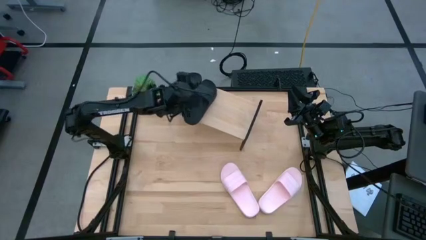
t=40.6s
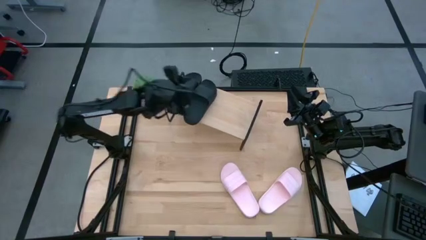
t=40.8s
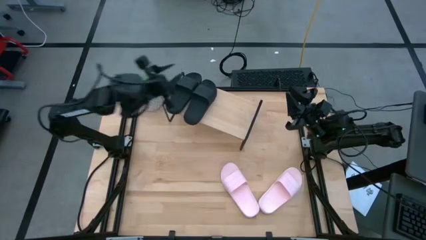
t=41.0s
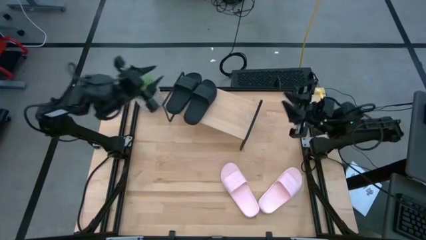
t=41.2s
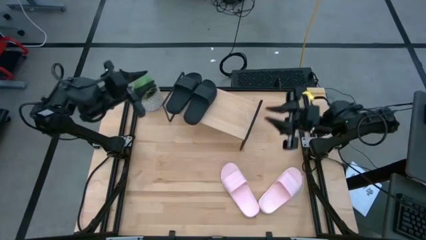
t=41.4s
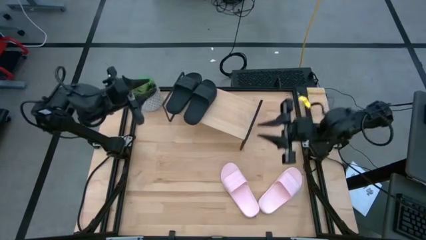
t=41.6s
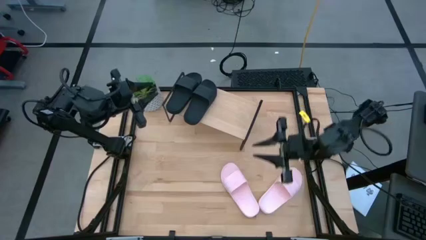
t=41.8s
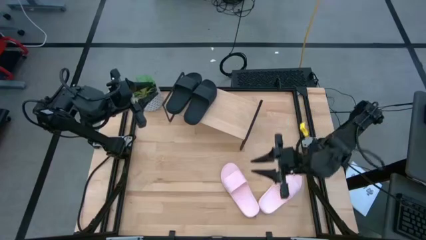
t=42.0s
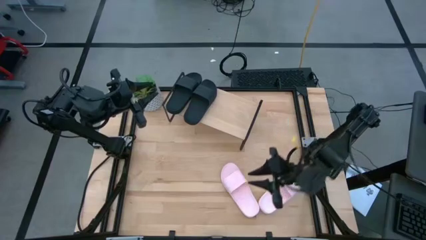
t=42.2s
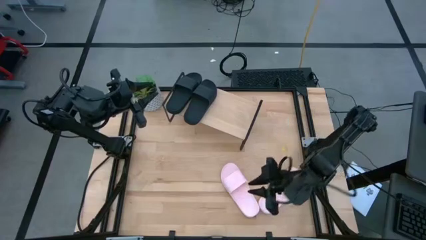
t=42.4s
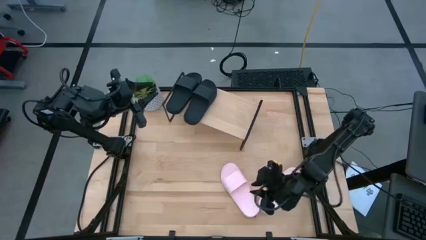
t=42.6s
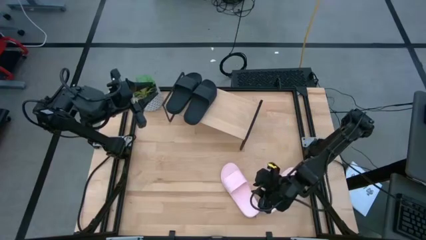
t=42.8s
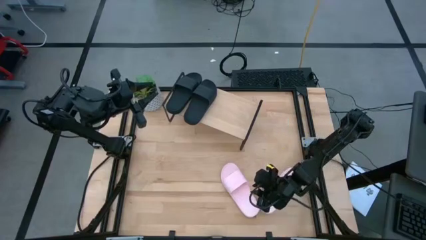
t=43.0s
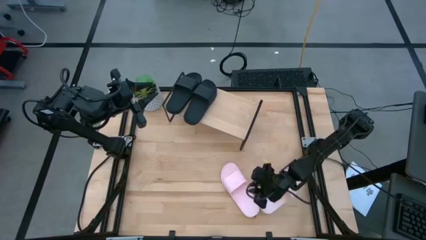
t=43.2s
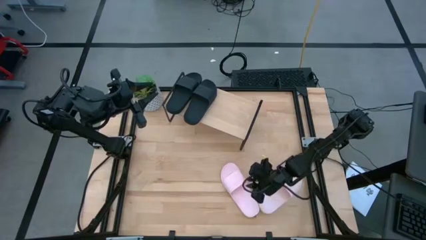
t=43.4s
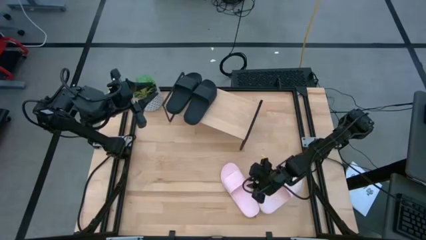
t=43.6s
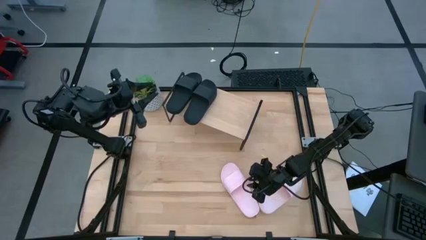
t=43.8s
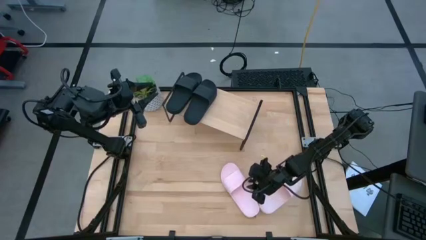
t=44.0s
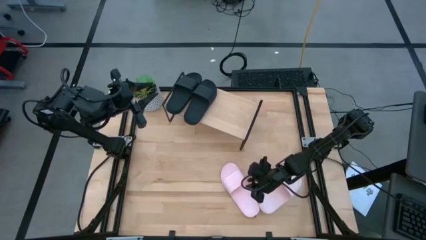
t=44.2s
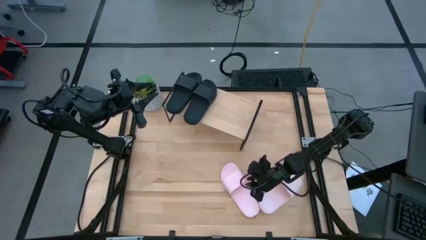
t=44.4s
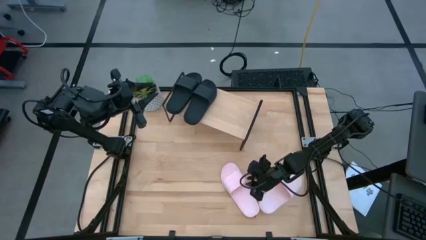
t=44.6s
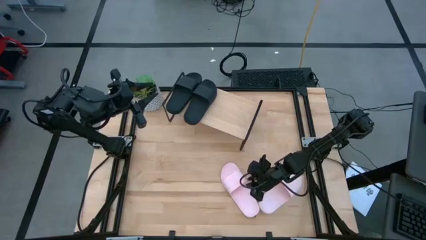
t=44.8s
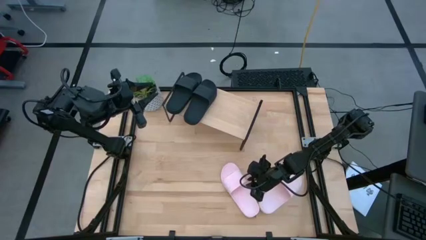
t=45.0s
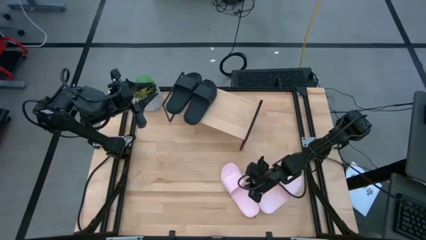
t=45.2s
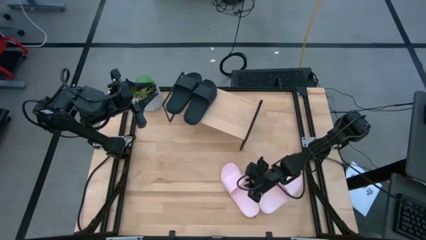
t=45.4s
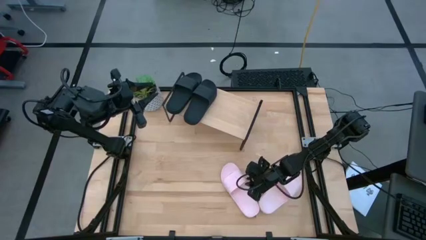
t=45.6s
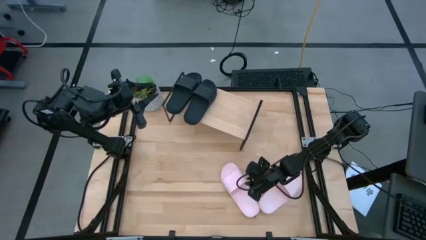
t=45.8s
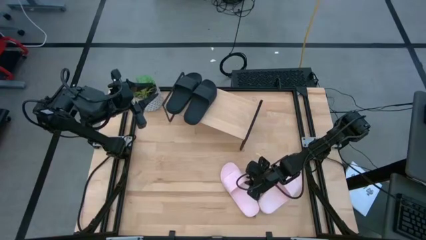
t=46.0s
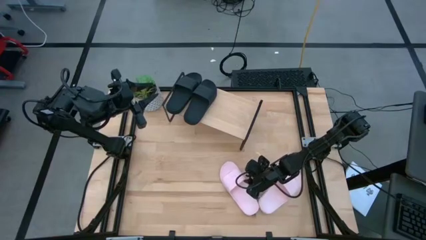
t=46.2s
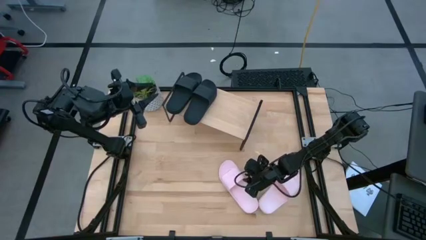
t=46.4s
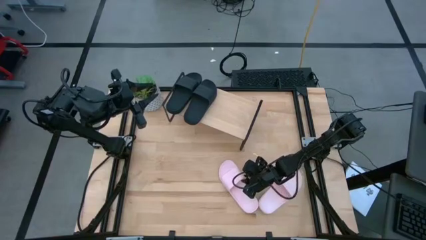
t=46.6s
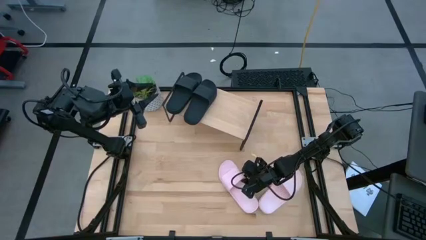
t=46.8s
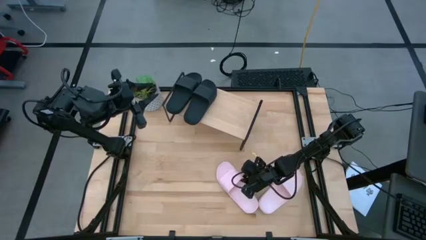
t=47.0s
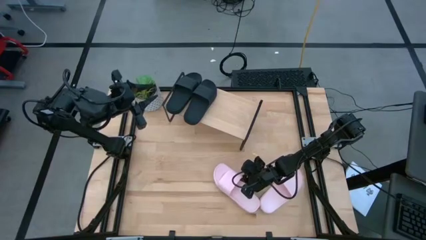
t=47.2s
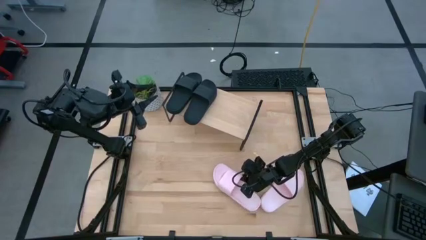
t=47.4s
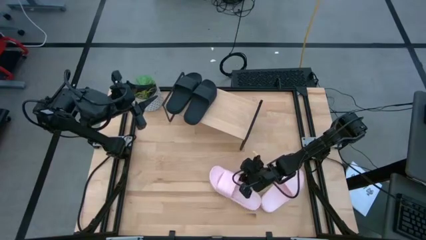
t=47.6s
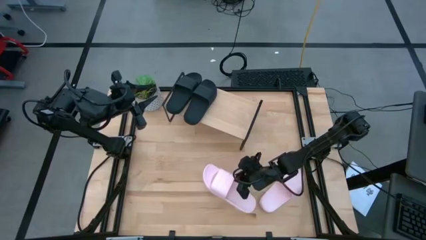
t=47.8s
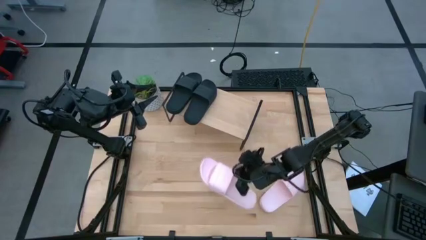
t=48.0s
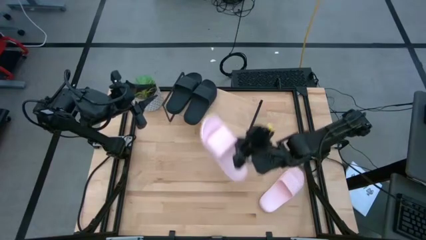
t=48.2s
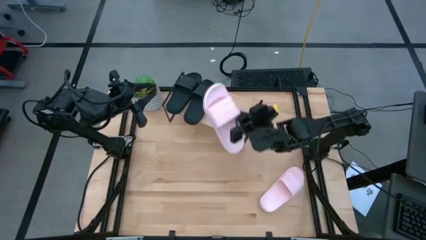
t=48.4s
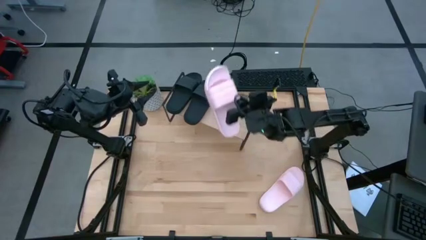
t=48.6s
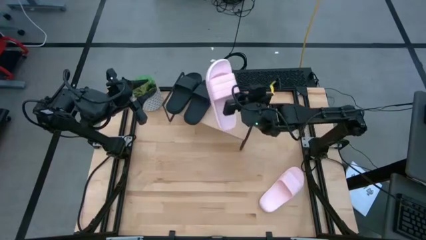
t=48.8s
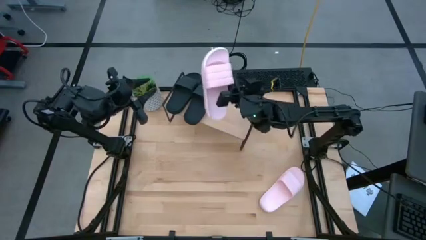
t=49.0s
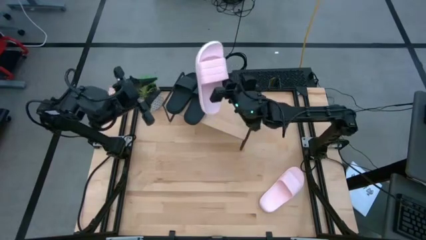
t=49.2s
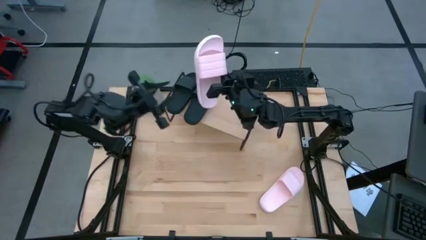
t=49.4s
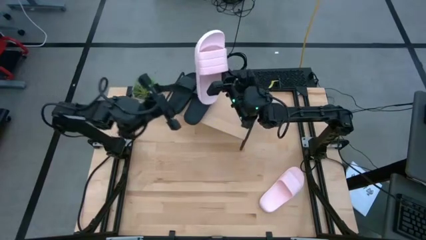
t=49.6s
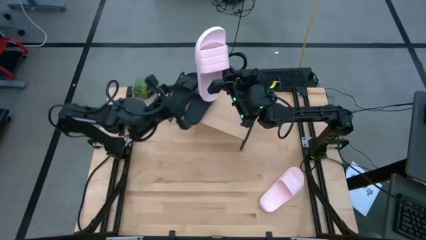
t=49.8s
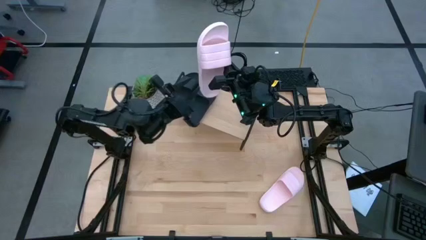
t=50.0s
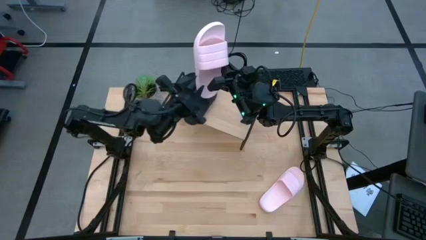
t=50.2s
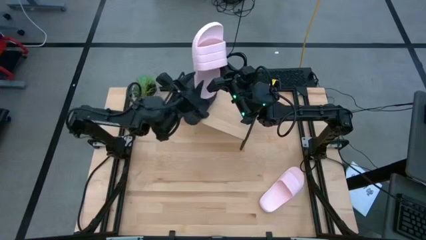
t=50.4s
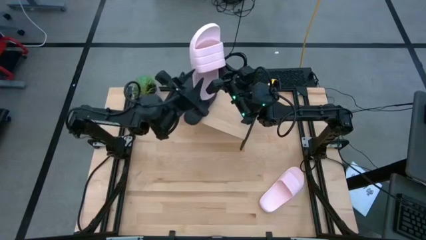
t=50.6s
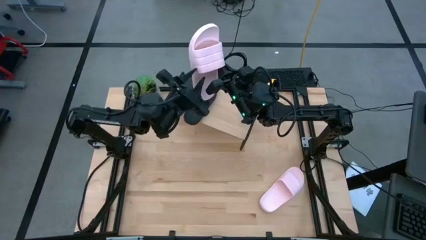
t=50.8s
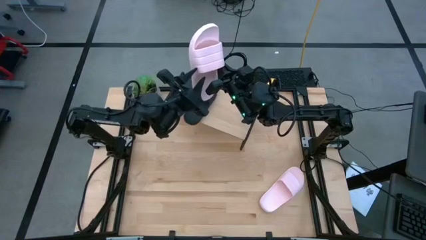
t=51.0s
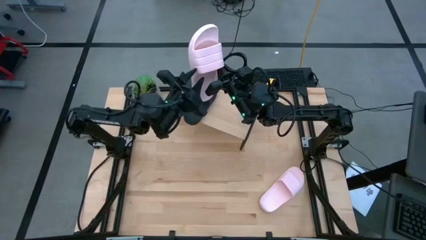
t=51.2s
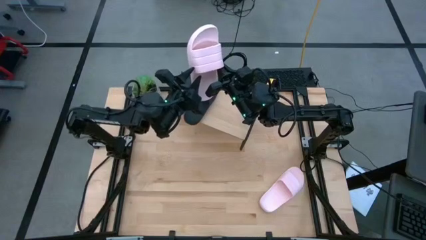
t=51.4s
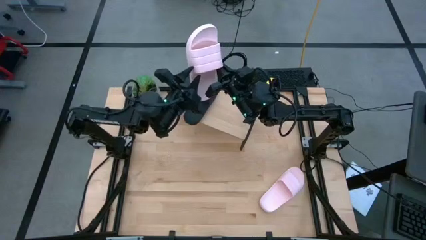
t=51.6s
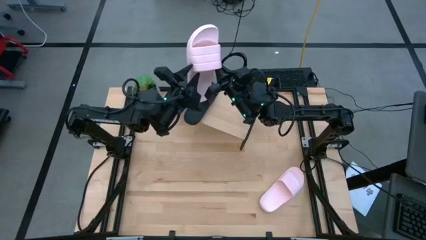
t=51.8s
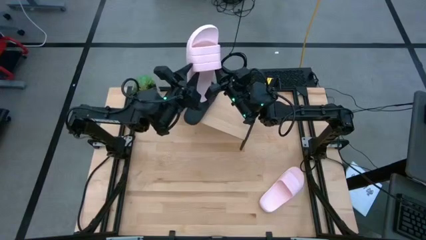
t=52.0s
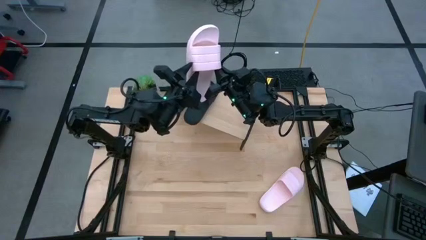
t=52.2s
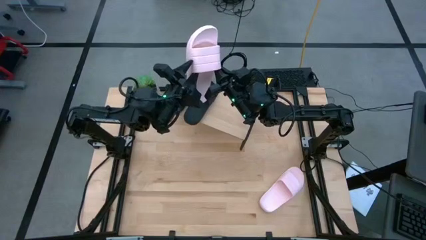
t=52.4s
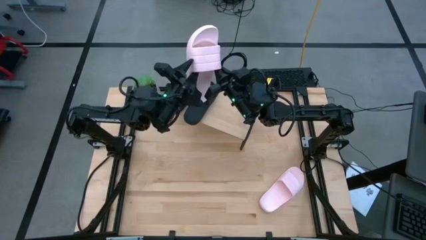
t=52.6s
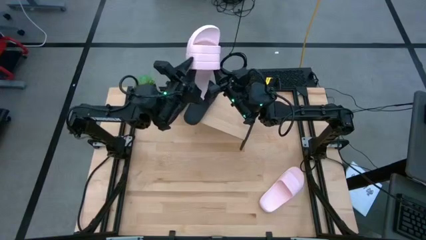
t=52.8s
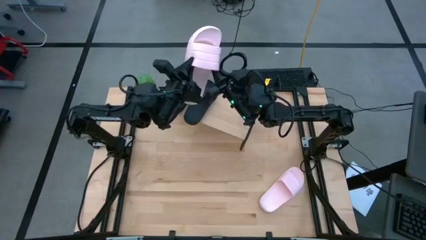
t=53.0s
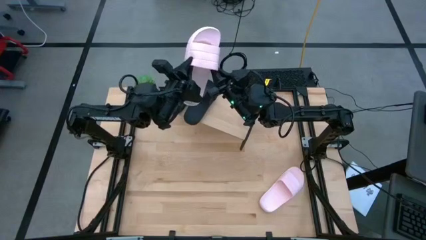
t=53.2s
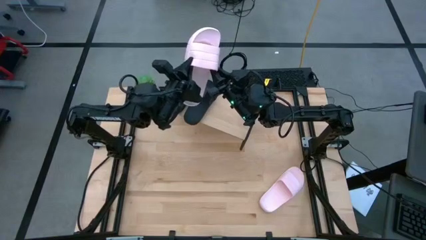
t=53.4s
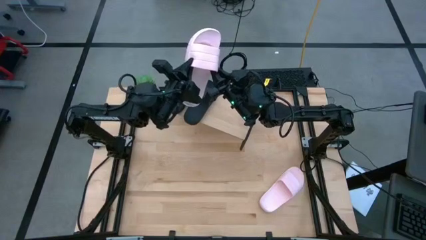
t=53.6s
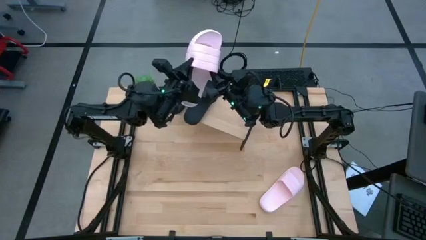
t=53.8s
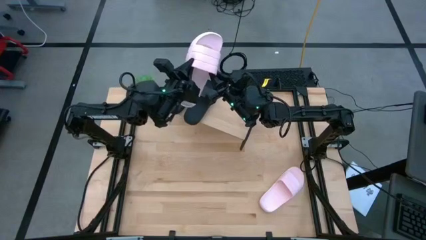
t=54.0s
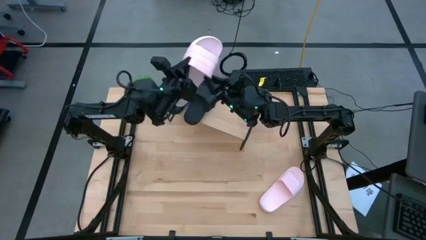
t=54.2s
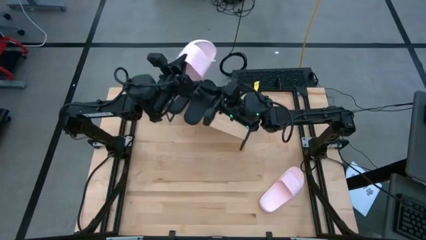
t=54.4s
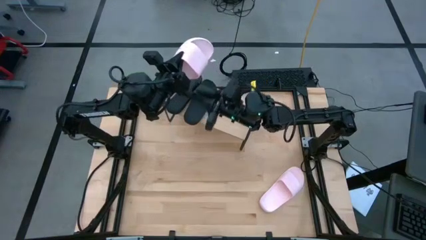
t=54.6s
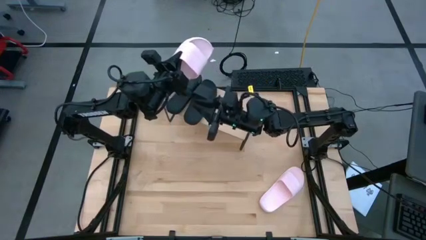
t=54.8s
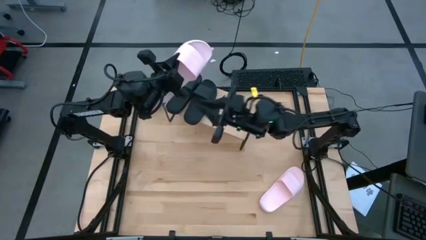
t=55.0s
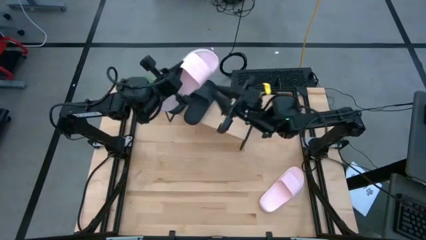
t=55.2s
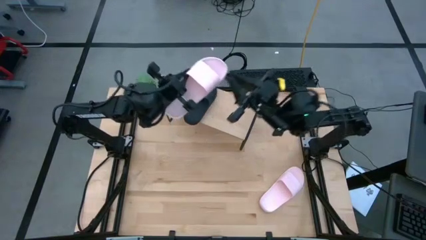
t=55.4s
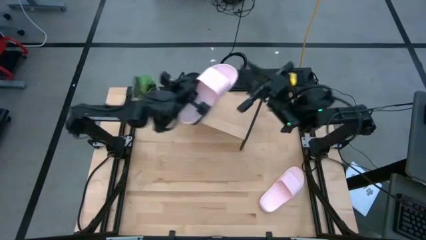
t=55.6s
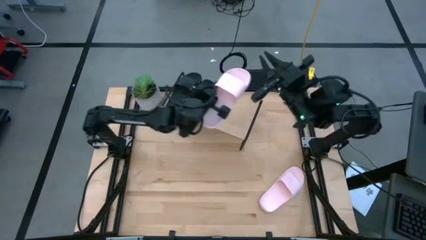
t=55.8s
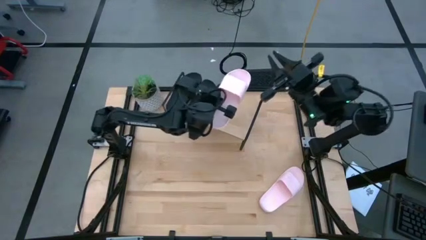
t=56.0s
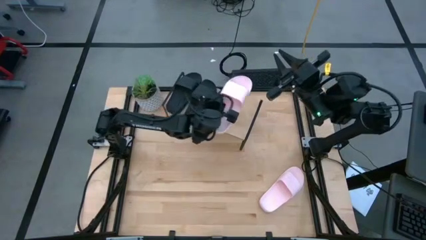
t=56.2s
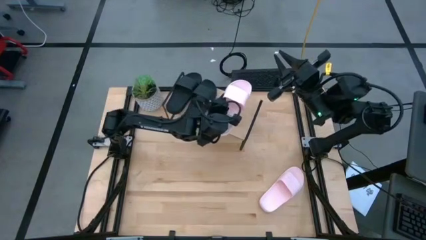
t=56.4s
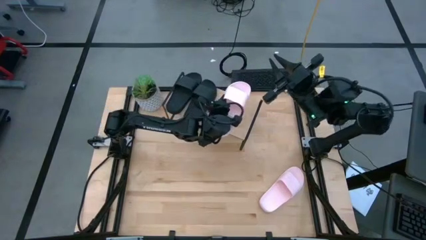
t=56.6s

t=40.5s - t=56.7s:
Task: Pick and place slides into the shelf
Put the left pink slipper on the shelf
